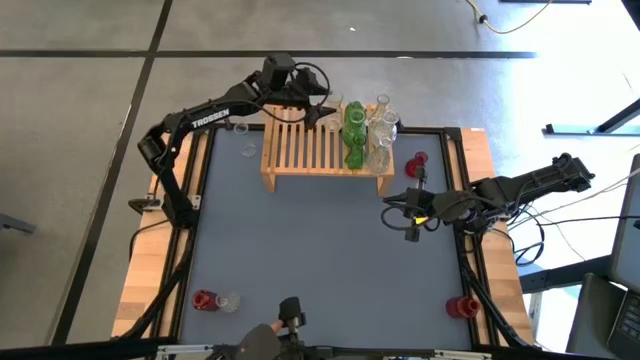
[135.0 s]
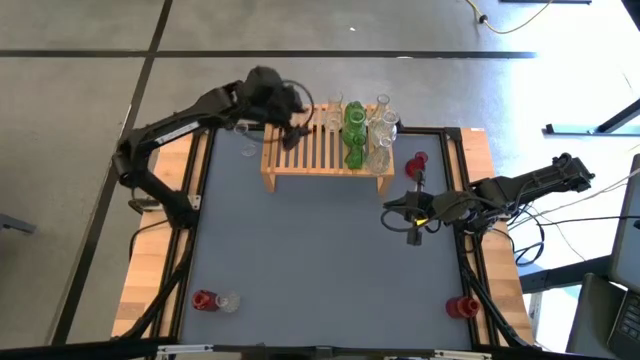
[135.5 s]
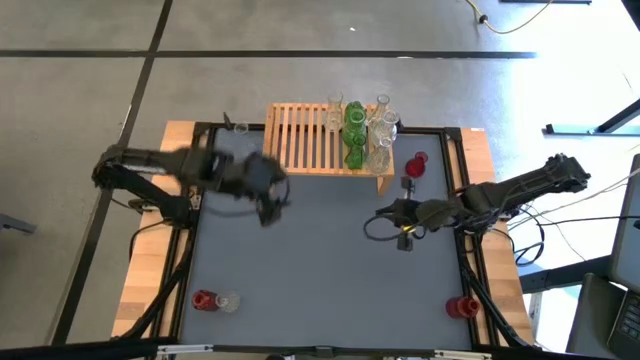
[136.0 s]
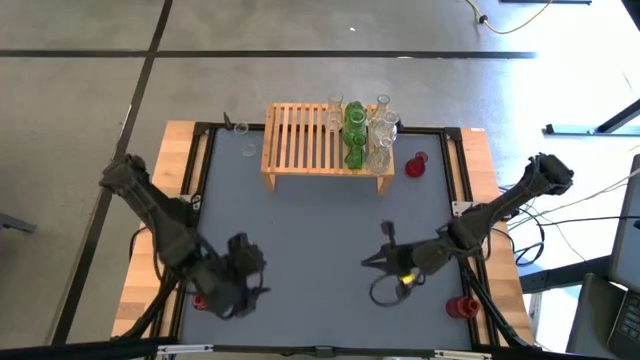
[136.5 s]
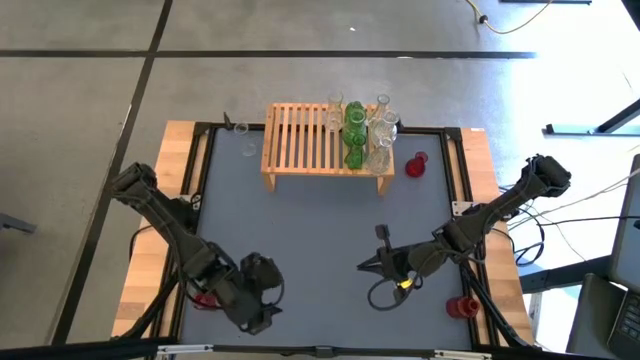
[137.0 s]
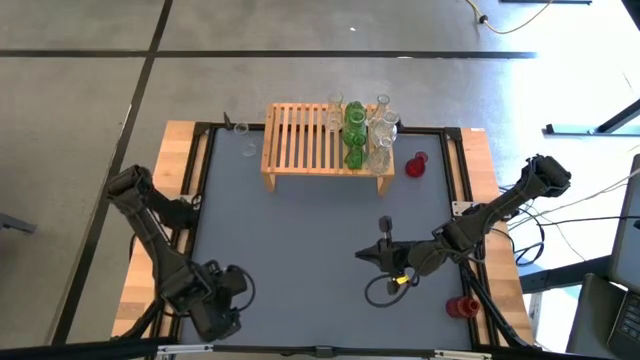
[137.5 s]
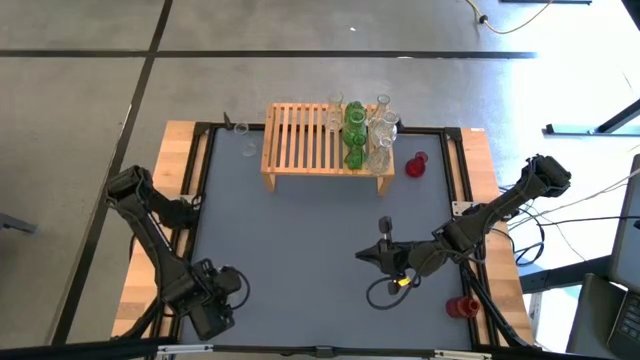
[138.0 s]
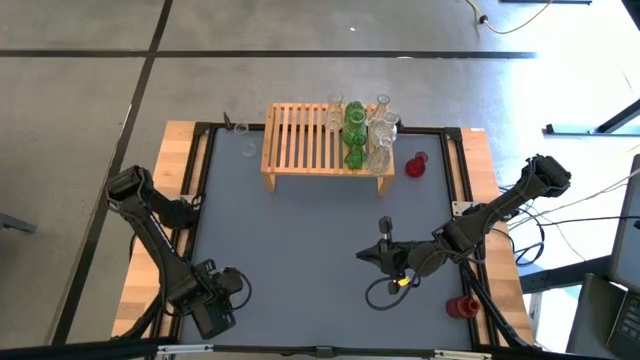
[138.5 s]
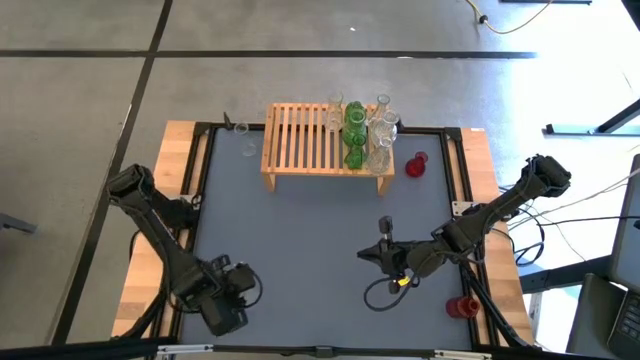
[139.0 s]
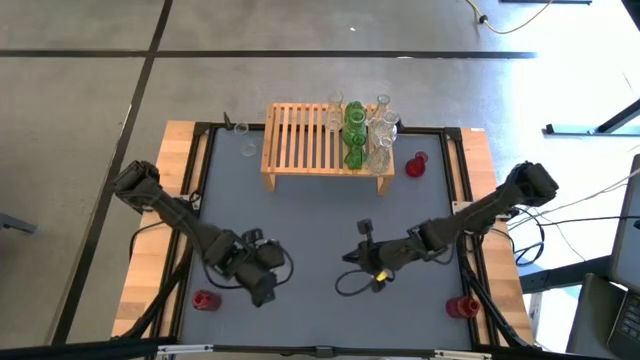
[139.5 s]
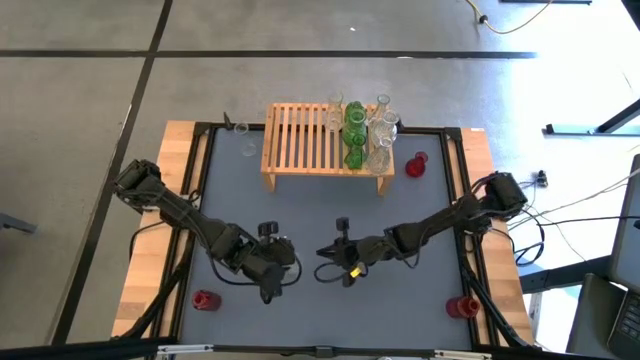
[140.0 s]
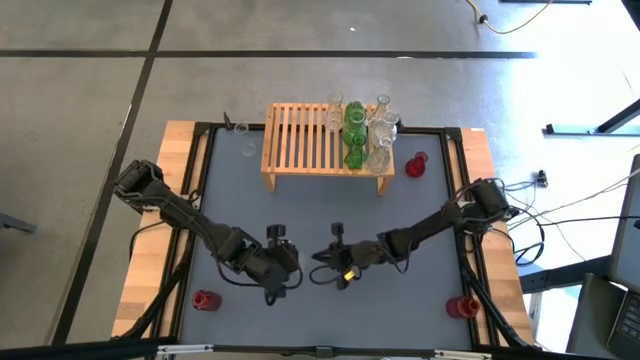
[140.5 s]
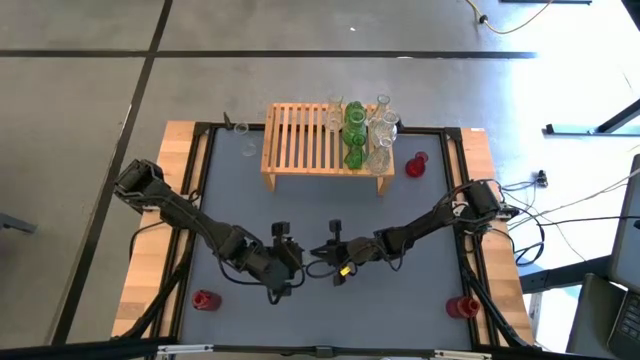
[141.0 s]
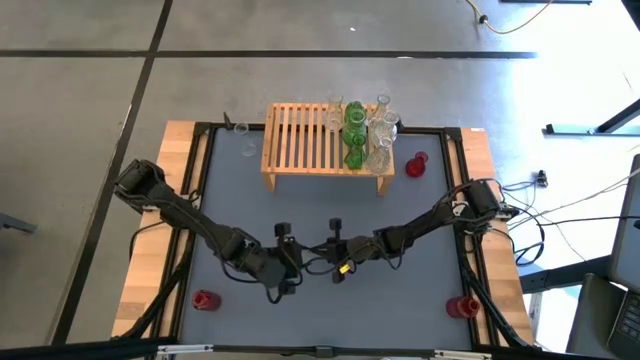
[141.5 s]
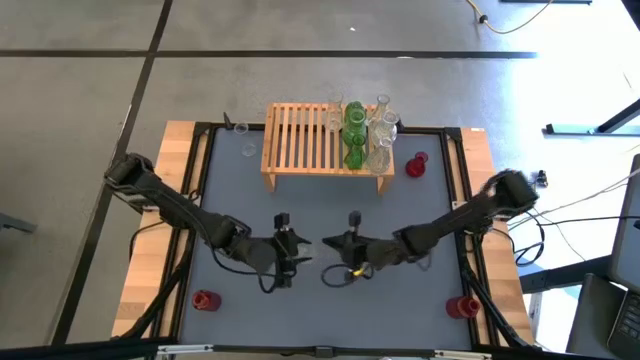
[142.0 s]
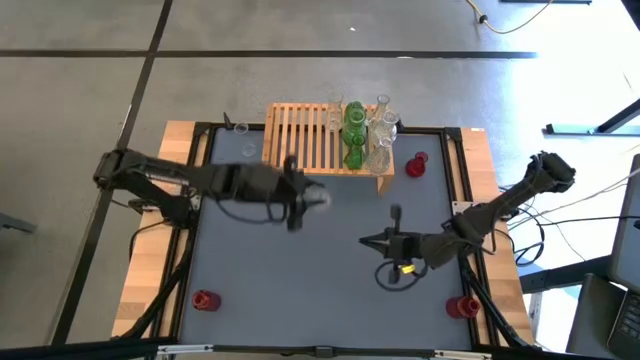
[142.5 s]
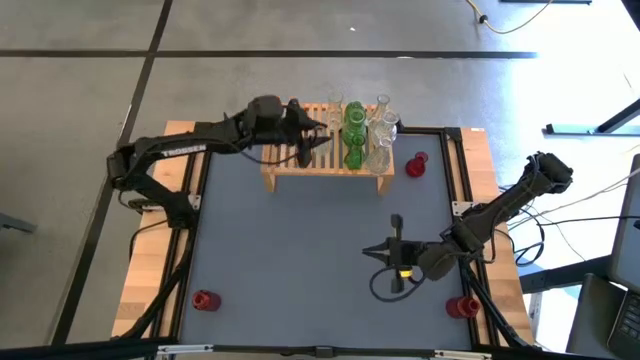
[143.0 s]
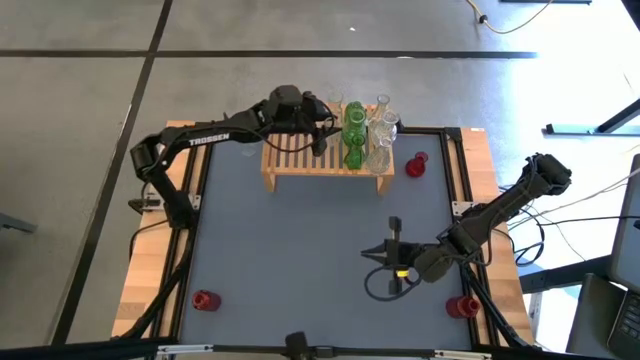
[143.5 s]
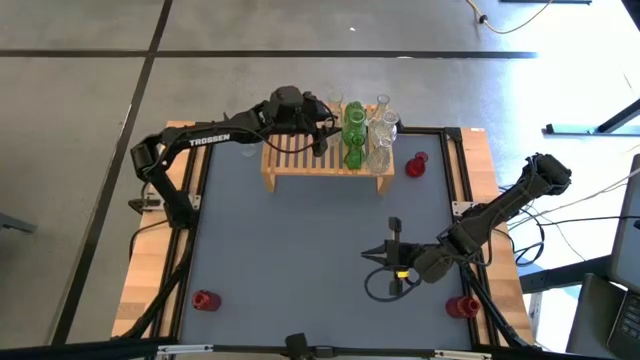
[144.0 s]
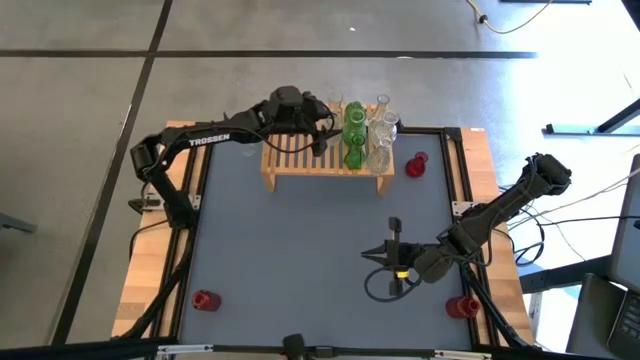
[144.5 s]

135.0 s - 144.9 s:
Task: sort vases onto shelf
Put the transparent vase on the shelf aligned with the other transparent vase

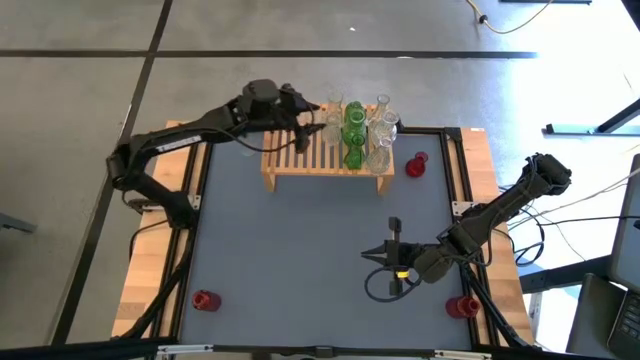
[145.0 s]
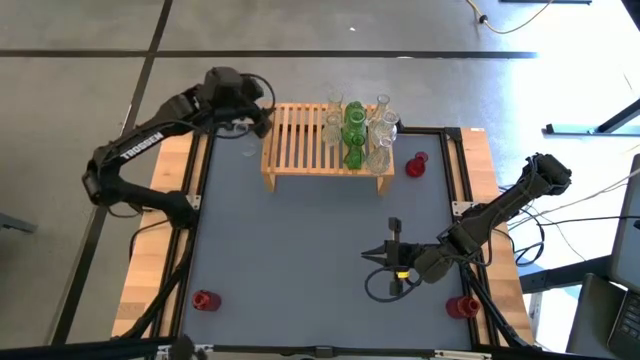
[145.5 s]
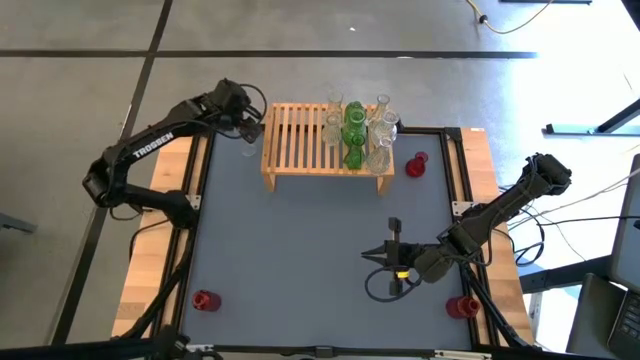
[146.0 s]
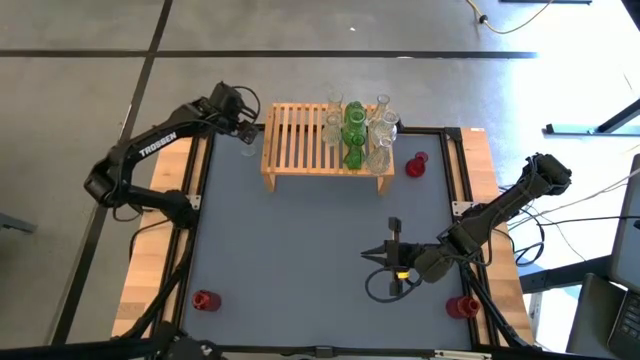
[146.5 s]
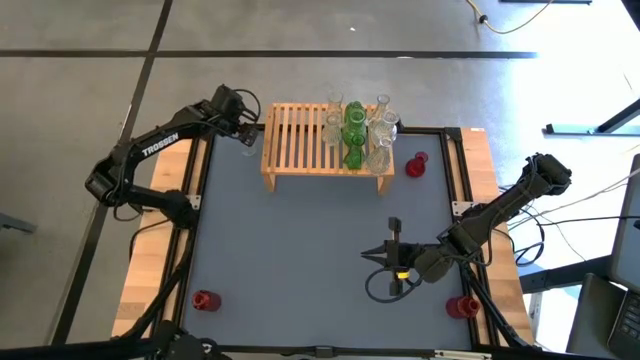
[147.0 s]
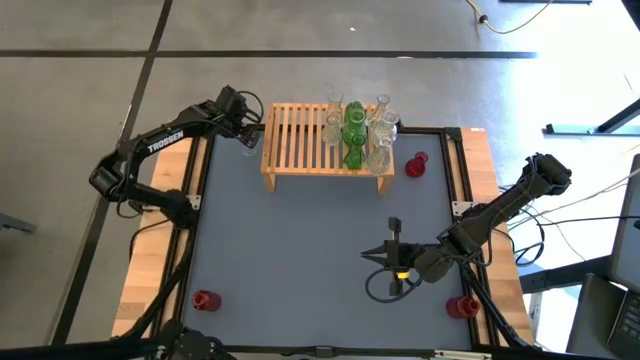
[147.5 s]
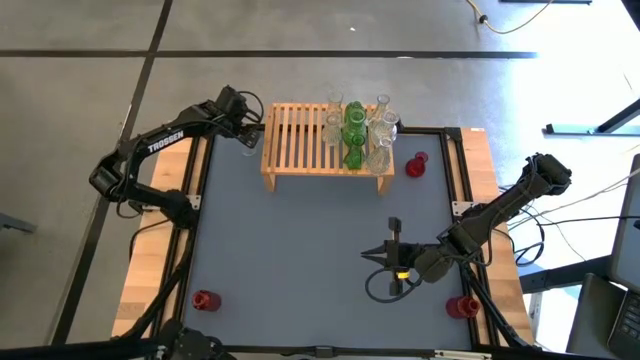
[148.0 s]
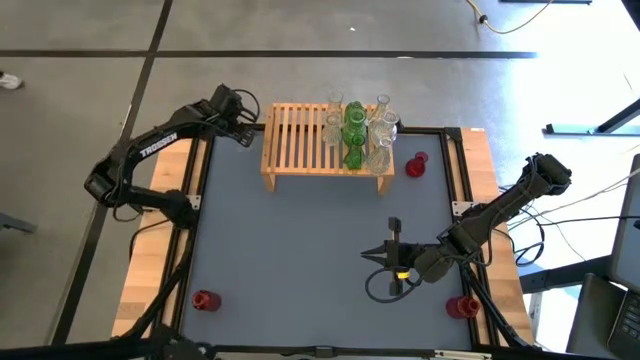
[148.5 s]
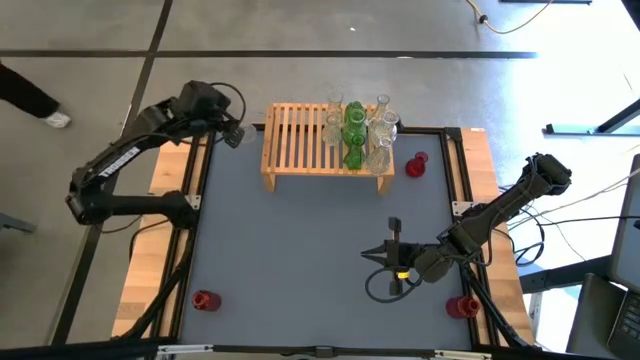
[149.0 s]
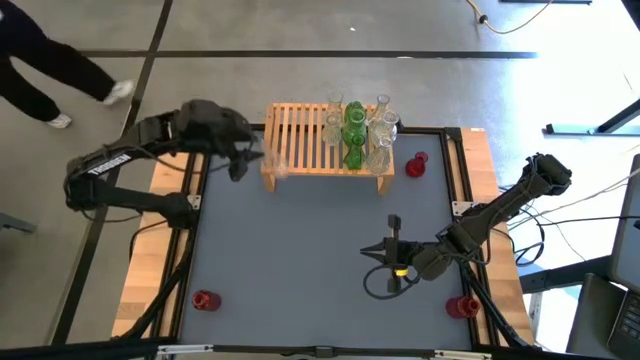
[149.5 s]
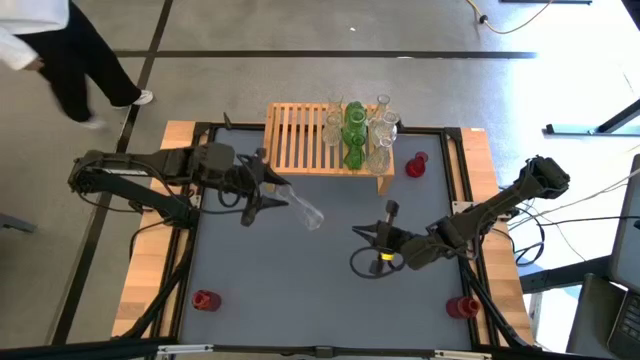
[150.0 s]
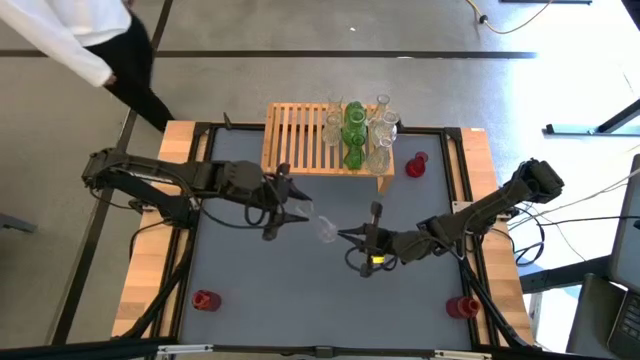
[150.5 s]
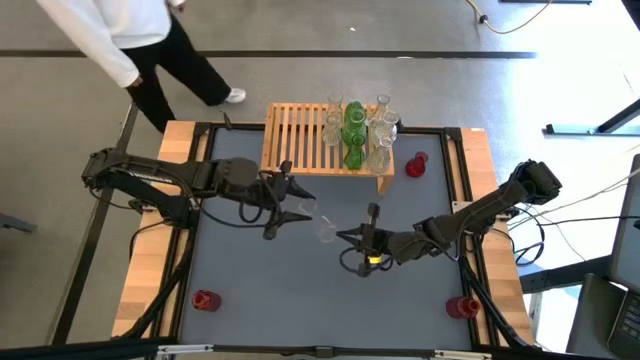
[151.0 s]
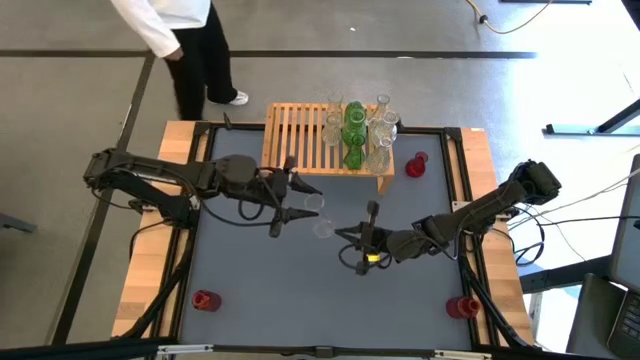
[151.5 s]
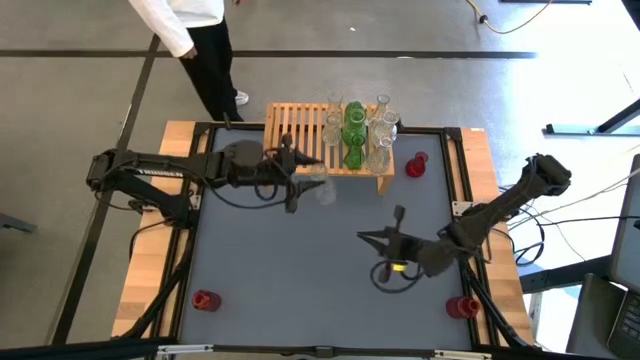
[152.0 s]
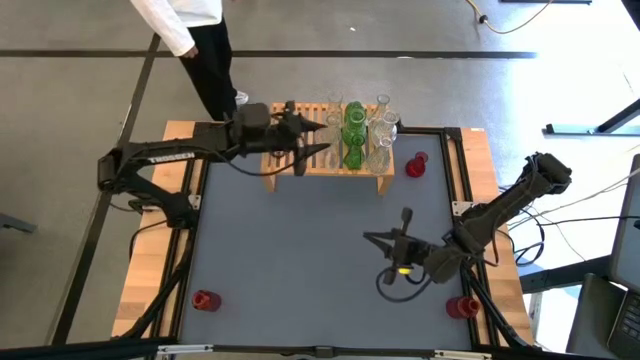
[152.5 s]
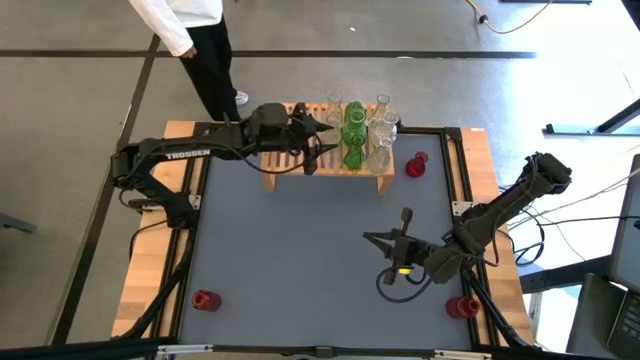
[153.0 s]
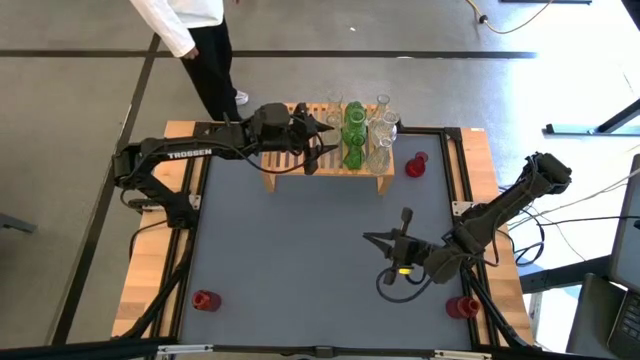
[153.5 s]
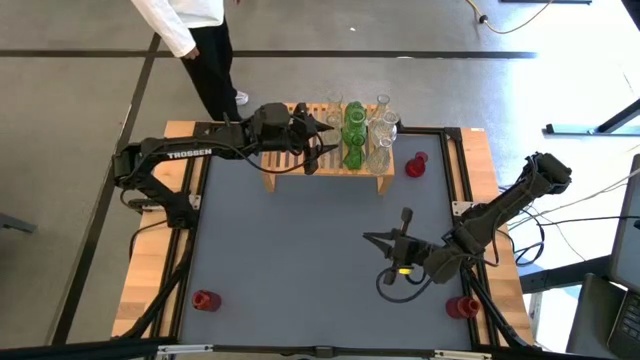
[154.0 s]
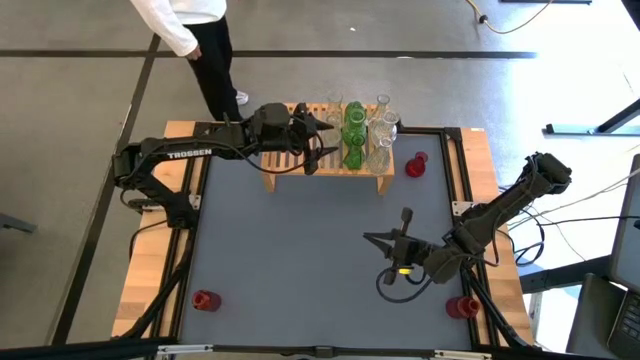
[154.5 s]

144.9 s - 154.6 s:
Put the transparent vase on the shelf aligned with the other transparent vase

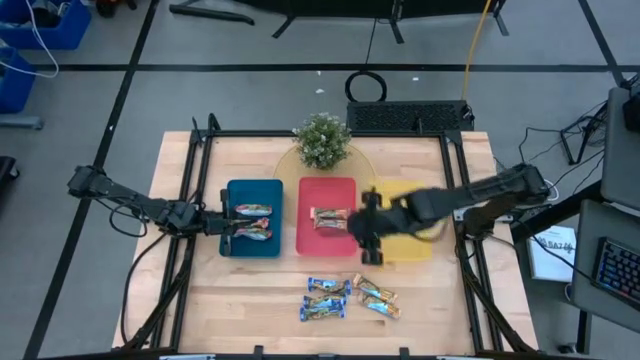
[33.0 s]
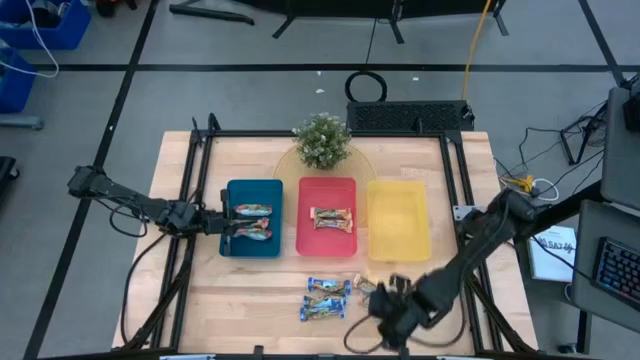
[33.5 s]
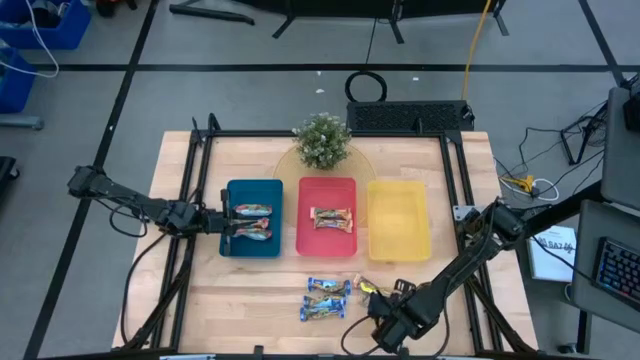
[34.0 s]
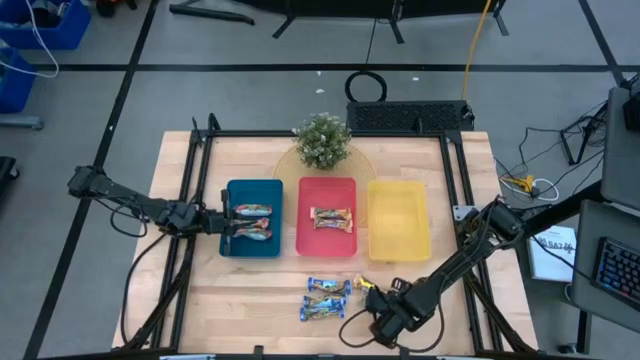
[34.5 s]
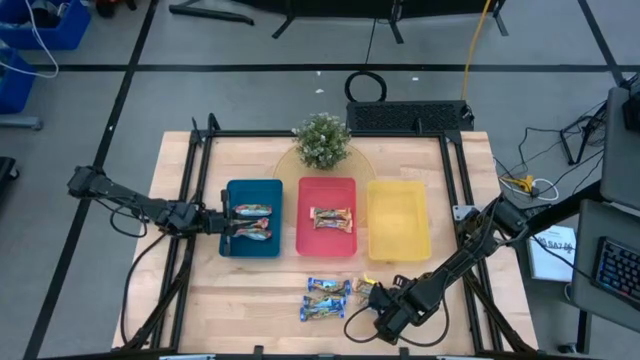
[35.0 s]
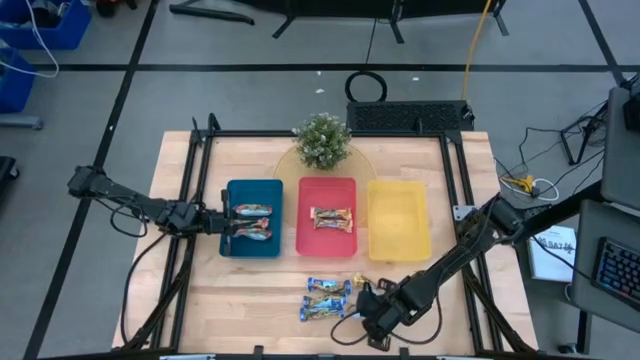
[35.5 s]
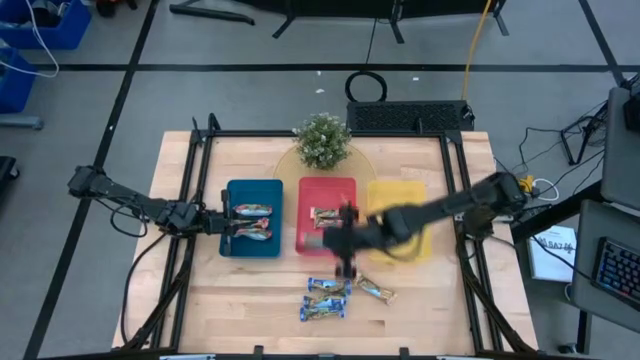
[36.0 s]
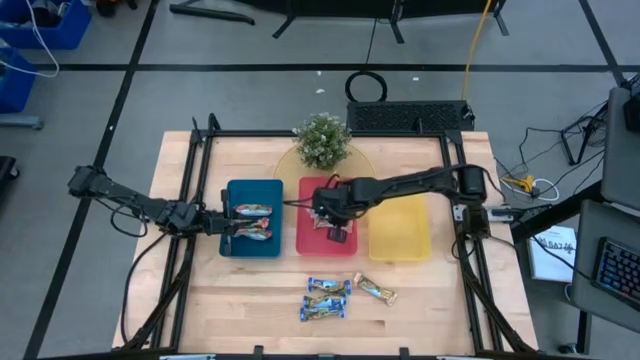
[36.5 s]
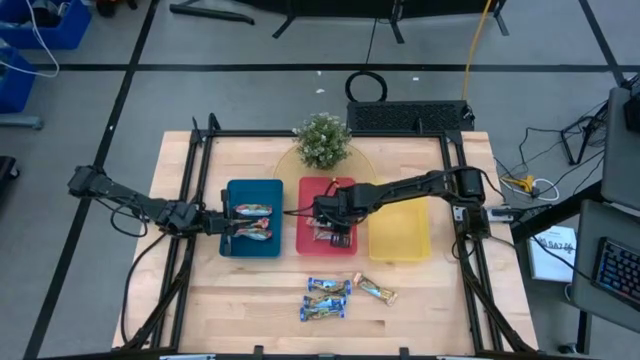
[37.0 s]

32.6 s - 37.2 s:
Task: Pick and place Granola Bars by type
Put the bottom yellow granola bar into the red bin
